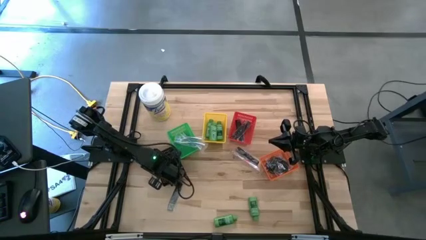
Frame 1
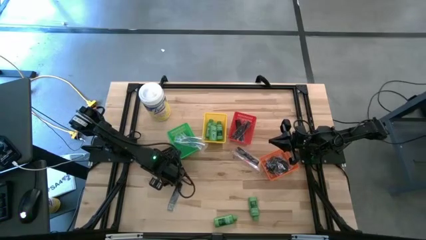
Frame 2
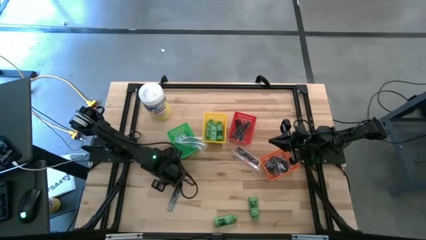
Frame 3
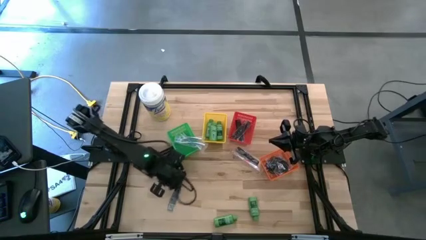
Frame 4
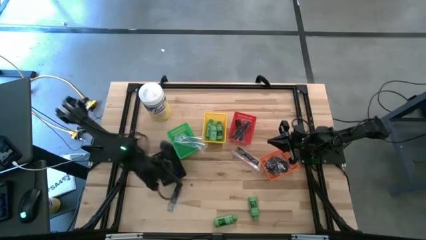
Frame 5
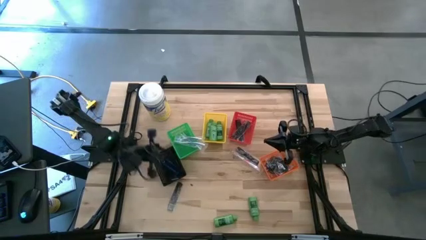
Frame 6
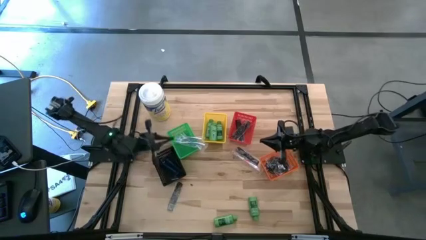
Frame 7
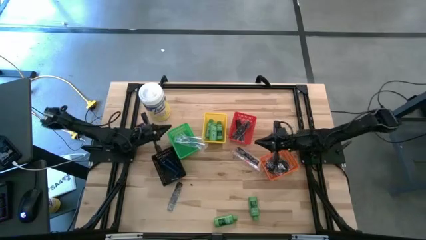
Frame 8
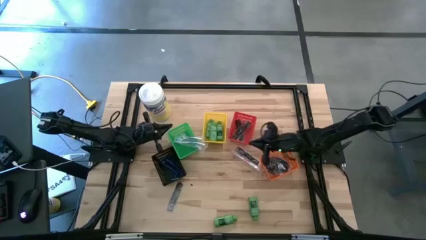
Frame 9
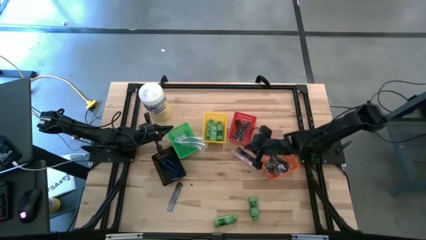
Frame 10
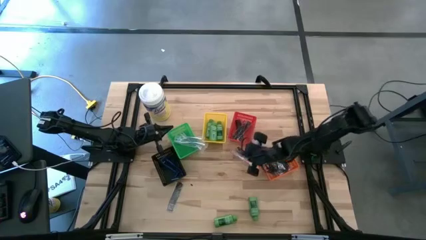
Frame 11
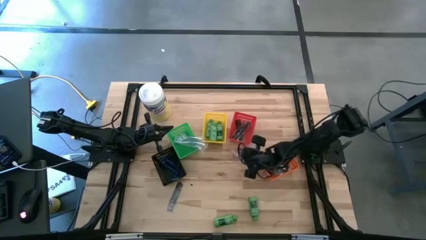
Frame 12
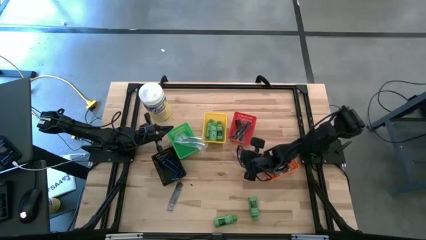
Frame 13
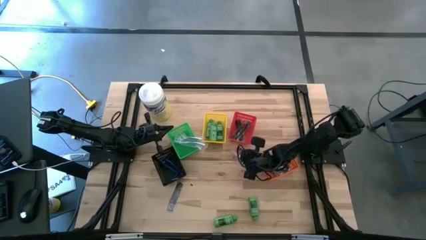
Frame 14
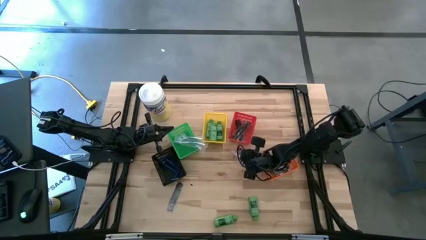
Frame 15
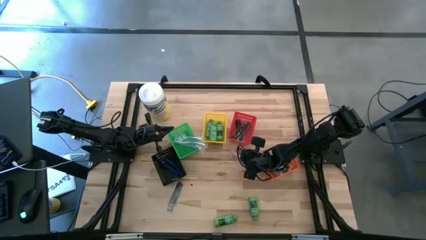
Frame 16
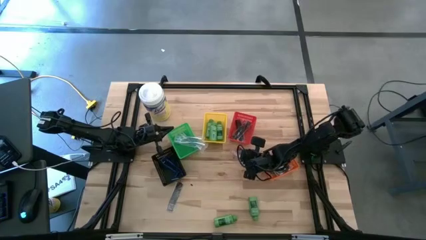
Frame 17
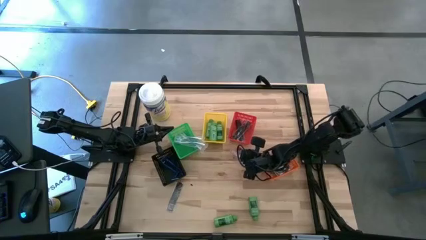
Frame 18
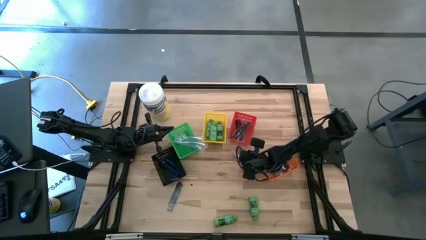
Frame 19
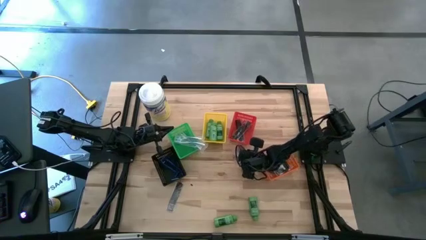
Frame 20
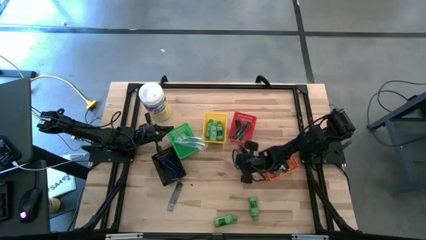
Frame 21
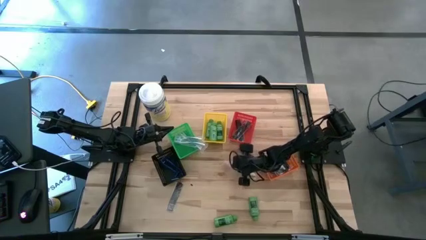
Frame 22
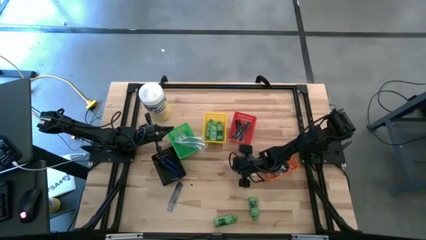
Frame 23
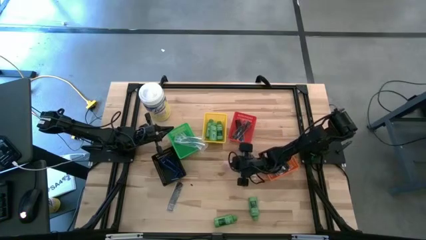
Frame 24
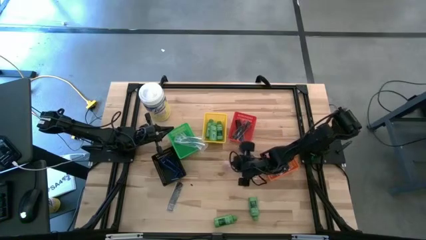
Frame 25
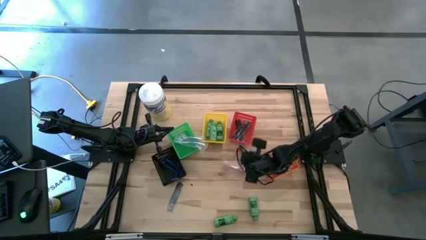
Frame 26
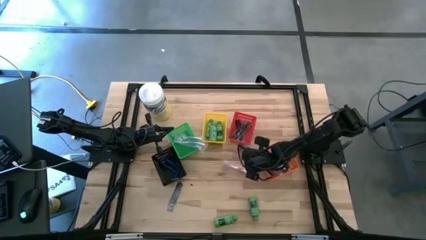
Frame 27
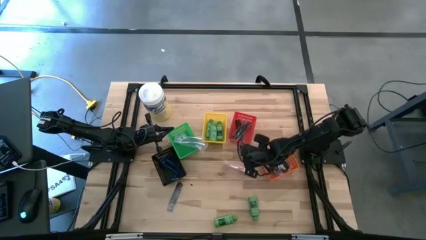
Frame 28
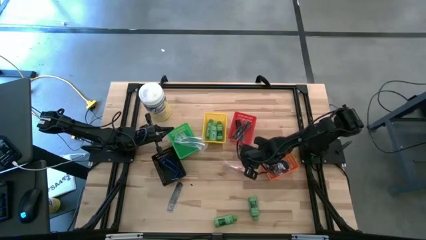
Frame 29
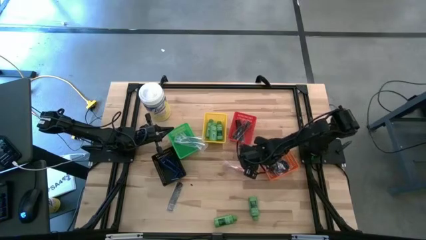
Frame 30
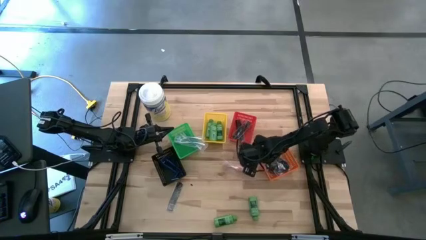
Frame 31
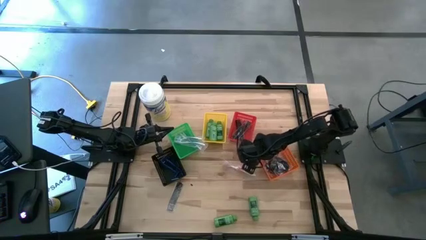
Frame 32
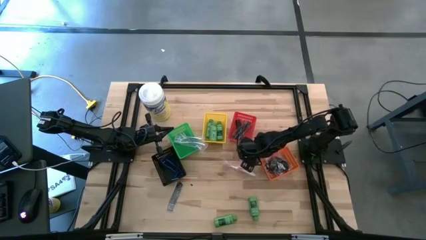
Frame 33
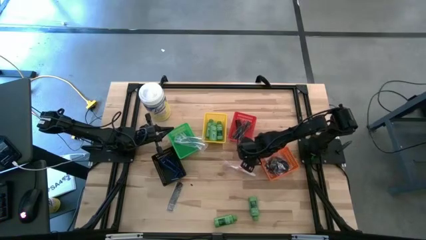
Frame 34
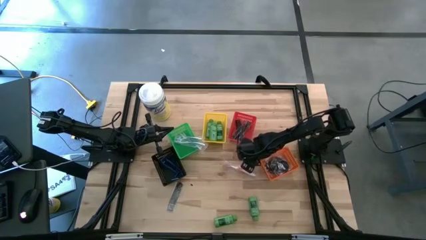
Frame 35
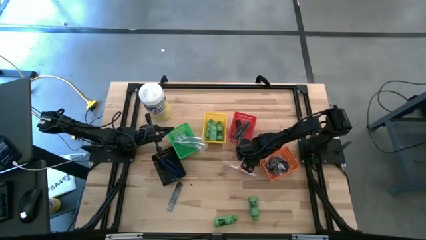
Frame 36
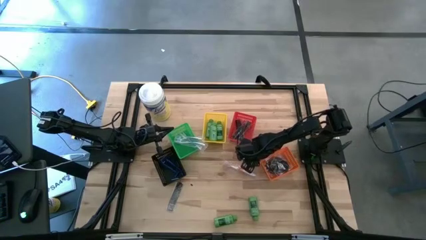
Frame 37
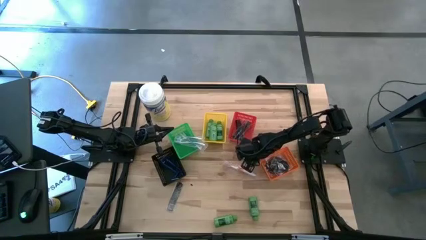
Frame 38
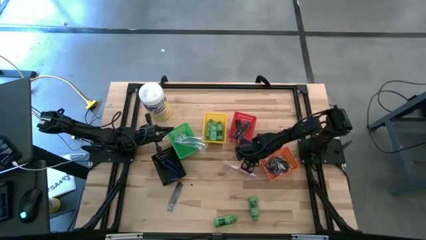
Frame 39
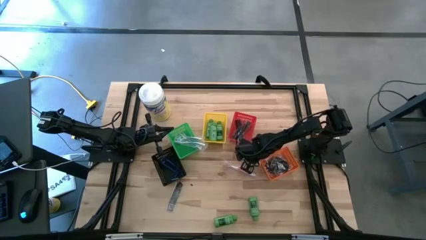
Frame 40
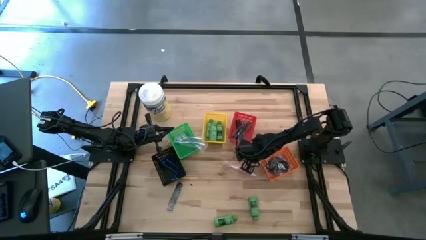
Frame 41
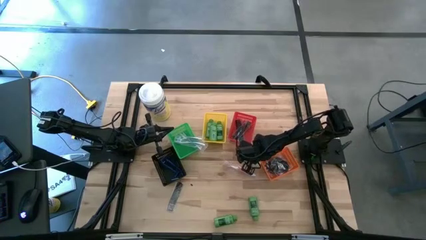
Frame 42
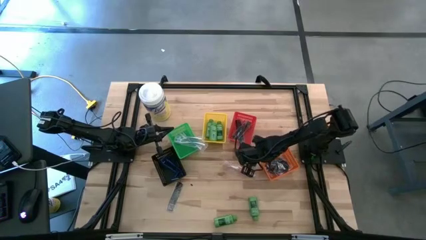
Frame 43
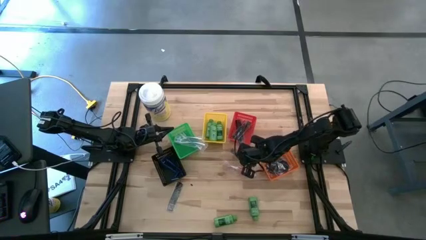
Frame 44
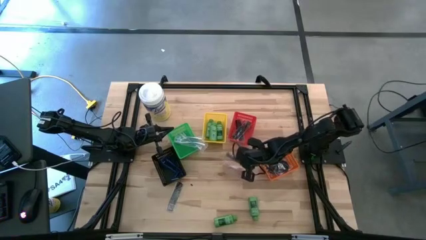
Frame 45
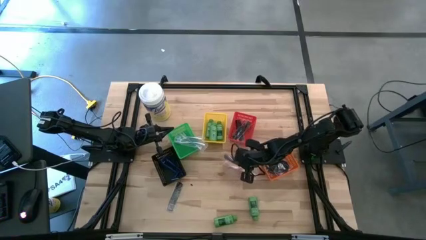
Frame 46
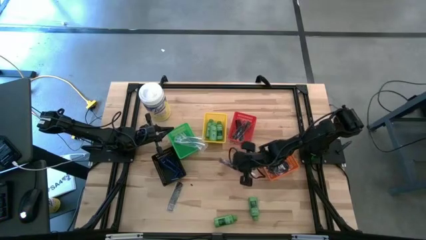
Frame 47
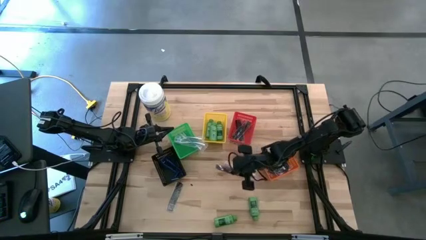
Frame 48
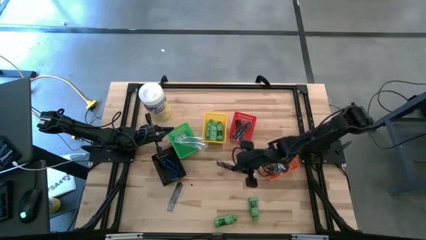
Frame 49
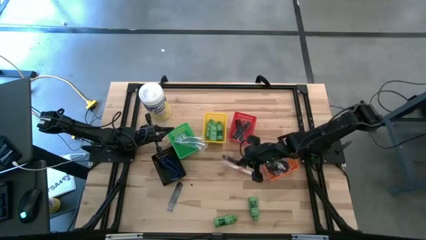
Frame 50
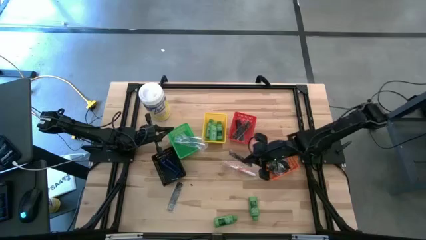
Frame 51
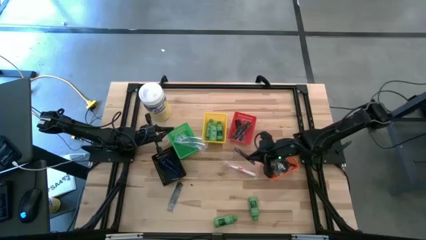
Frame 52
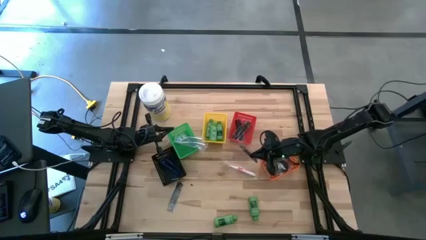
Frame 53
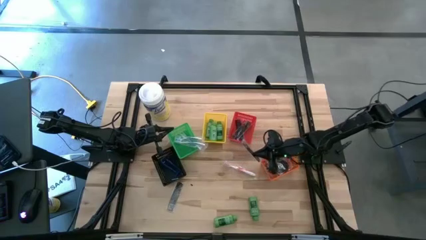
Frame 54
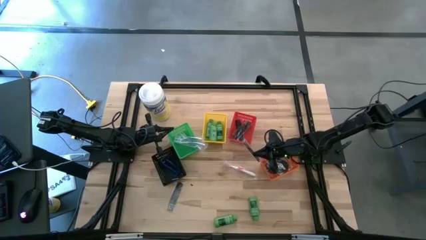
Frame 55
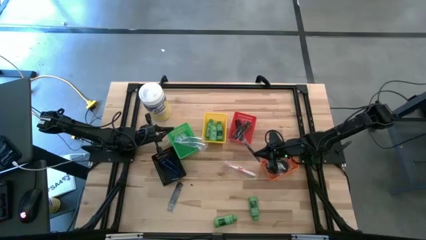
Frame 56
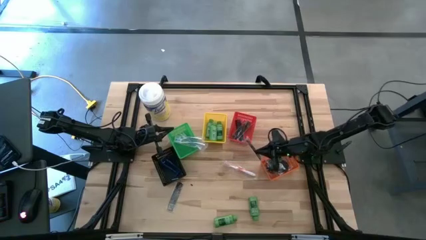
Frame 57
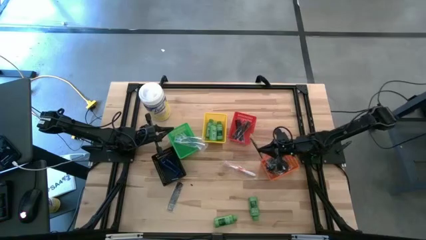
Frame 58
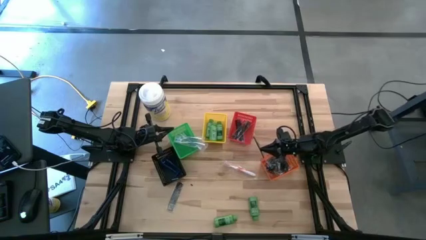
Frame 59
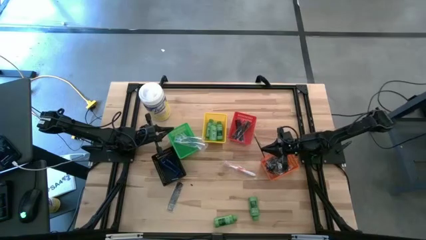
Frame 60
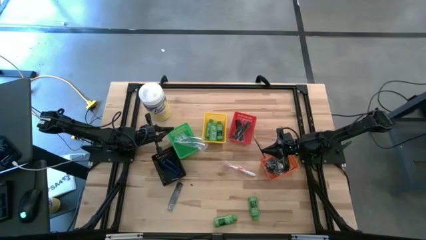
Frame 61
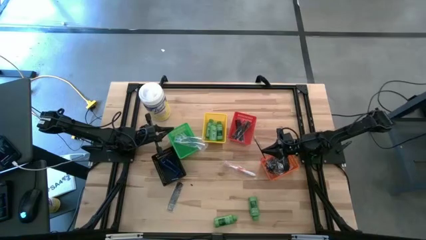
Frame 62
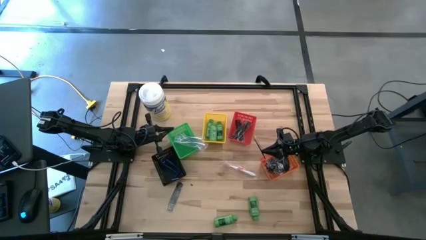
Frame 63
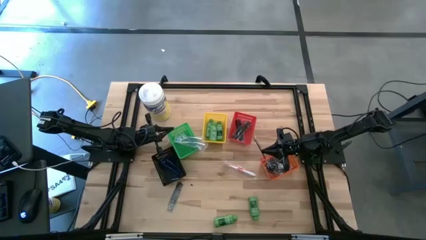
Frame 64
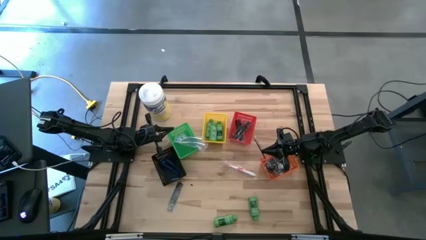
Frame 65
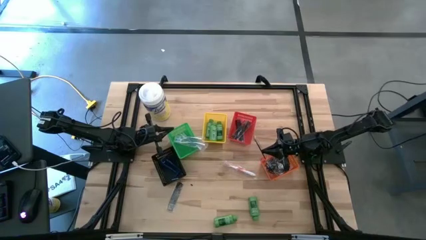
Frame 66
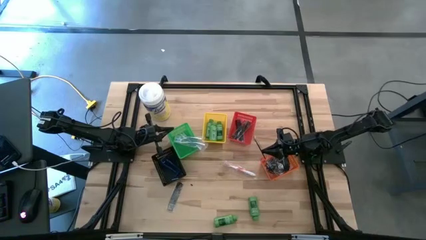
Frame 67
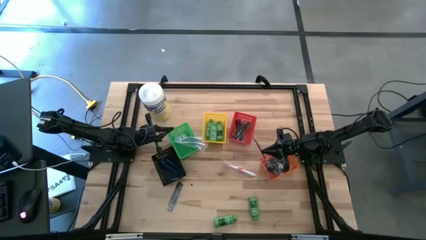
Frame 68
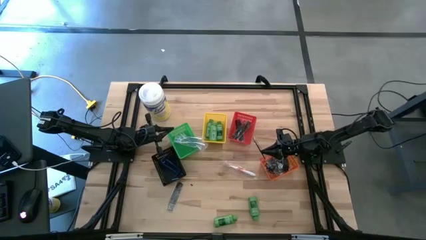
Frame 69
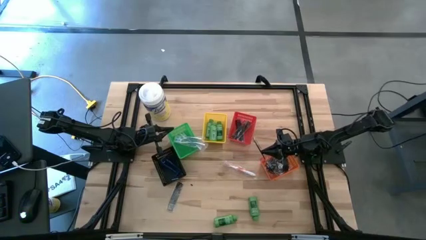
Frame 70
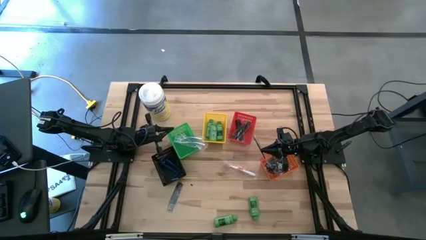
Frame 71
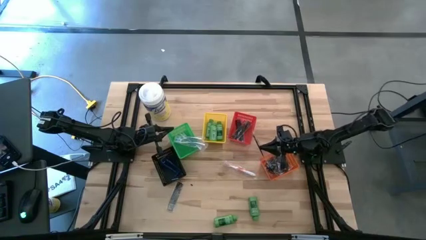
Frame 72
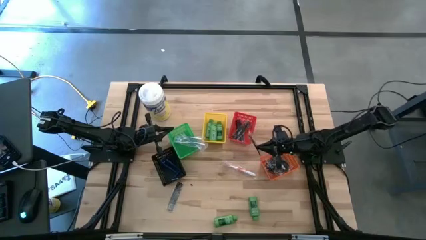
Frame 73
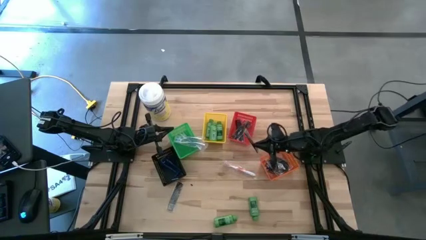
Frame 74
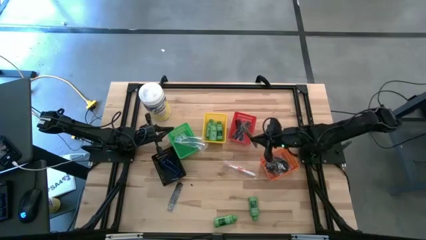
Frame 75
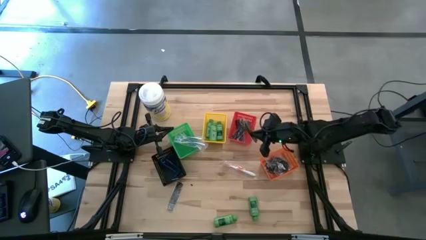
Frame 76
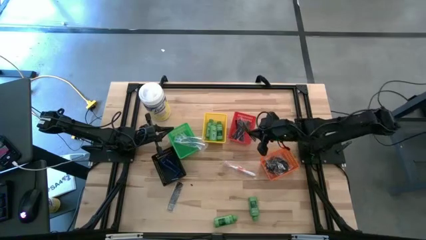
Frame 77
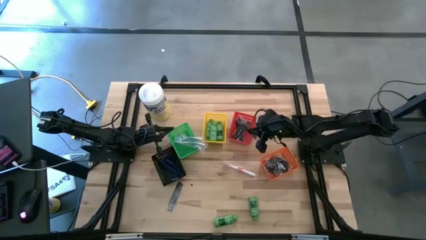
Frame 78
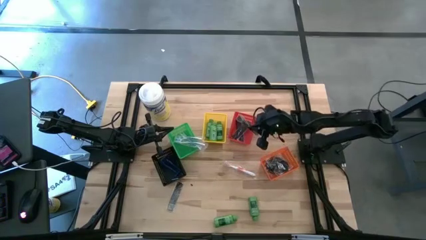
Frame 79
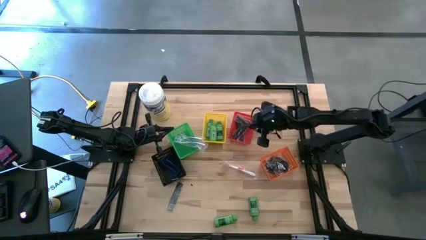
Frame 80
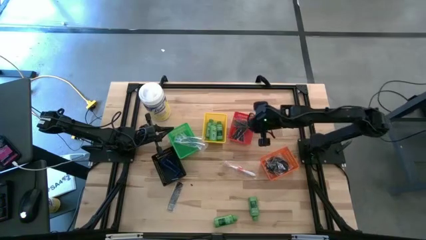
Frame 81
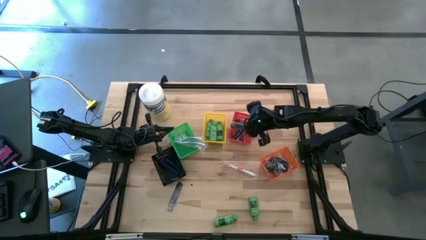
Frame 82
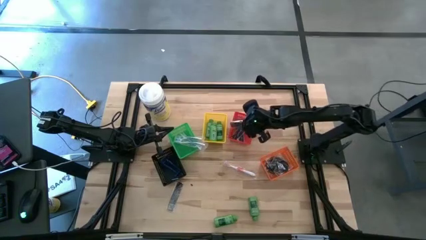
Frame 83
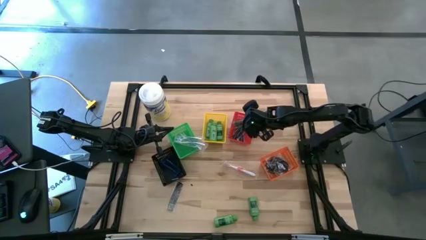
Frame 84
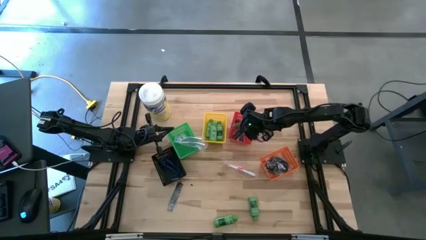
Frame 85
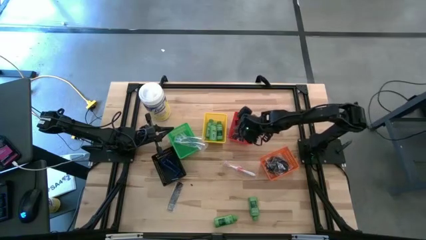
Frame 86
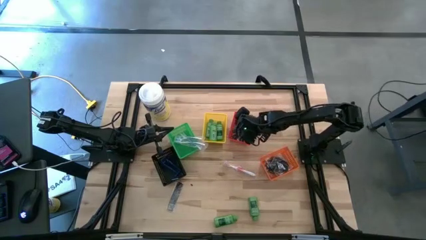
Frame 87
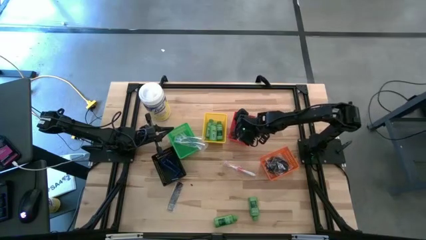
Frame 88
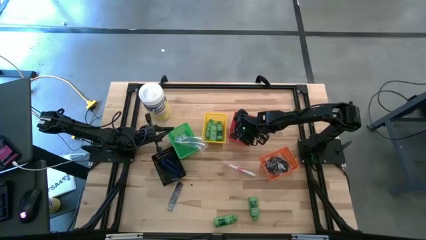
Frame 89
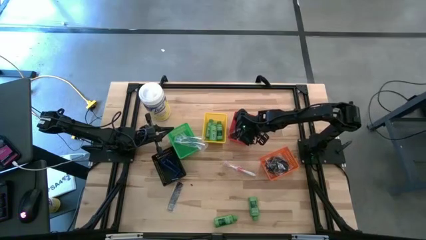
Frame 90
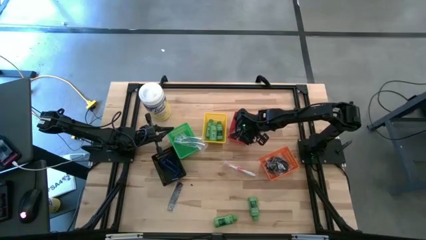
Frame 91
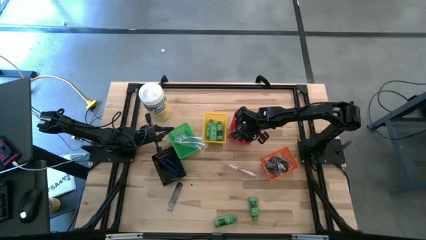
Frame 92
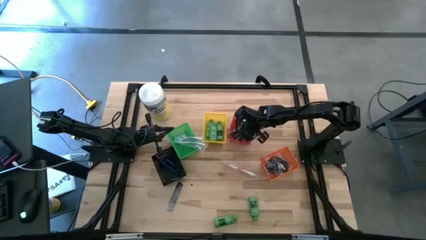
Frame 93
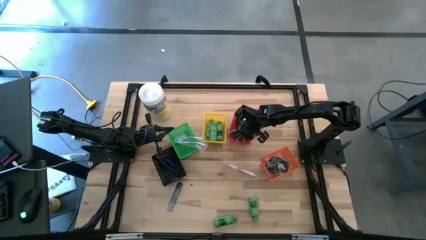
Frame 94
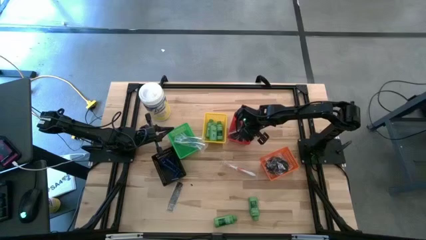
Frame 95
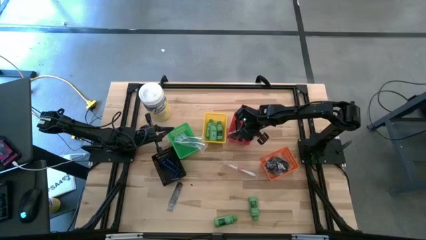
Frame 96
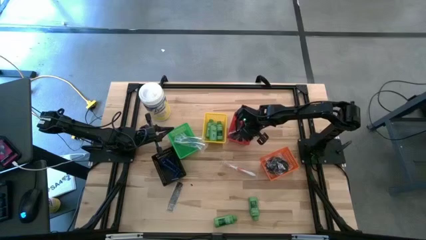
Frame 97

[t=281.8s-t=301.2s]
Task: Pick & Place Travel size toiletries
Put the black comb into the red bin
